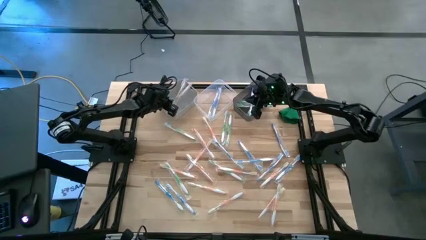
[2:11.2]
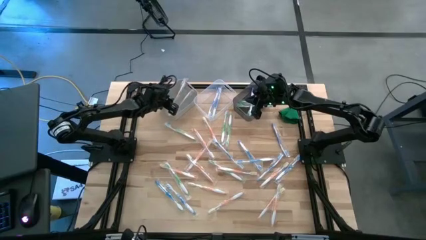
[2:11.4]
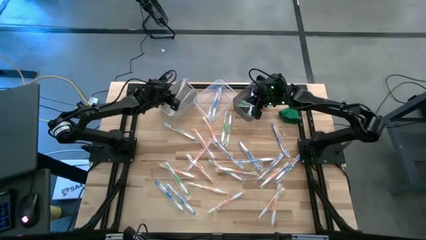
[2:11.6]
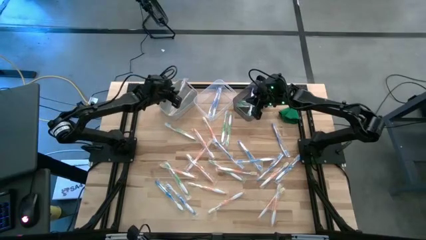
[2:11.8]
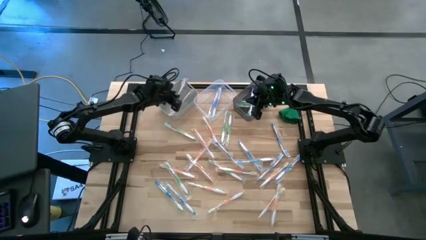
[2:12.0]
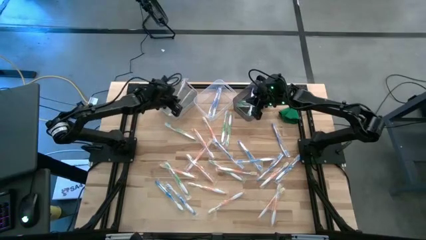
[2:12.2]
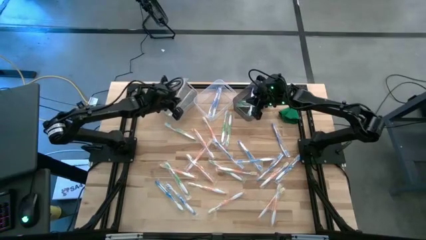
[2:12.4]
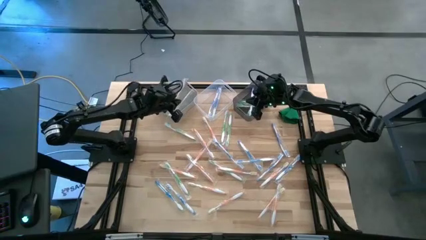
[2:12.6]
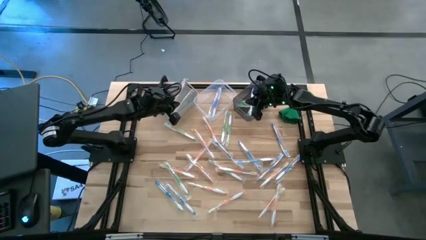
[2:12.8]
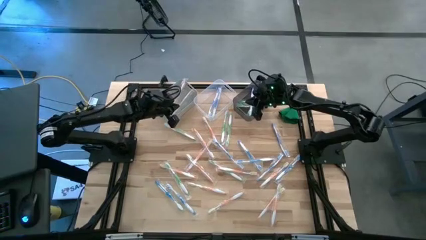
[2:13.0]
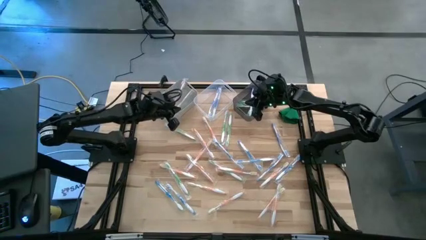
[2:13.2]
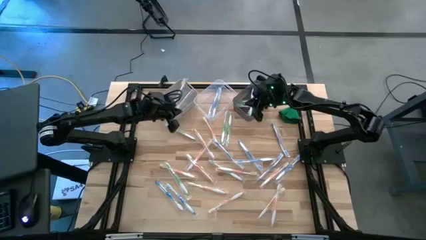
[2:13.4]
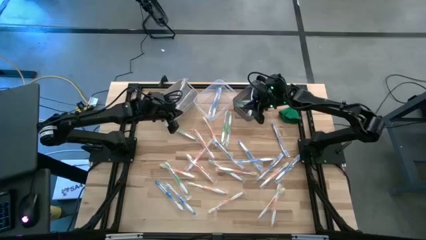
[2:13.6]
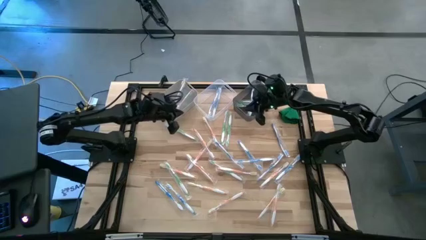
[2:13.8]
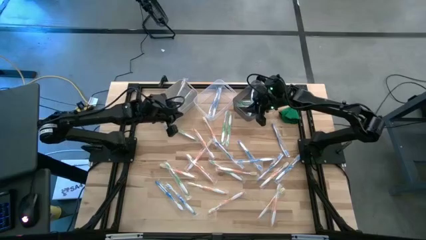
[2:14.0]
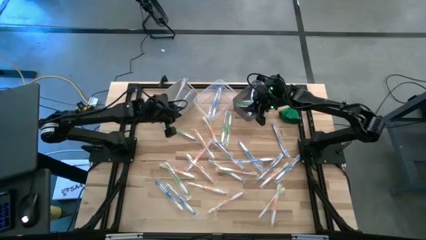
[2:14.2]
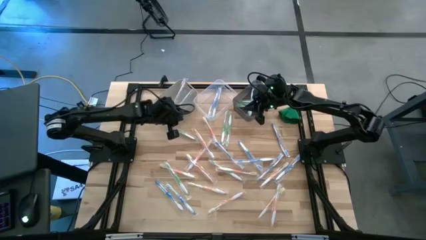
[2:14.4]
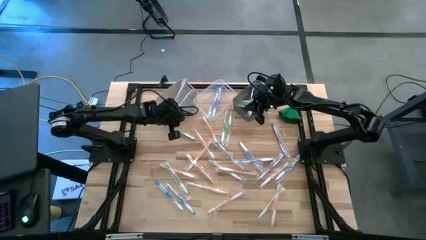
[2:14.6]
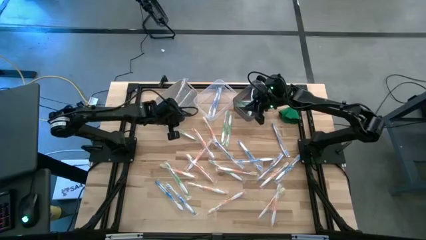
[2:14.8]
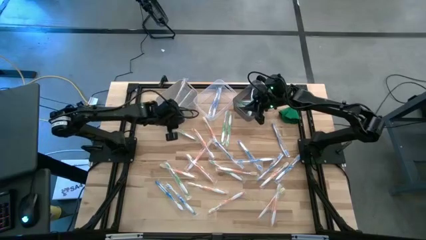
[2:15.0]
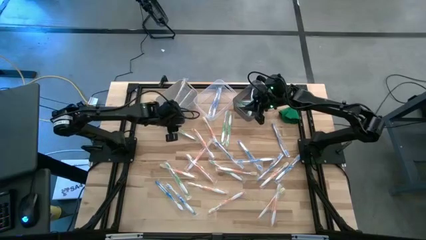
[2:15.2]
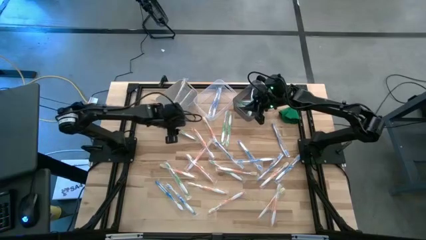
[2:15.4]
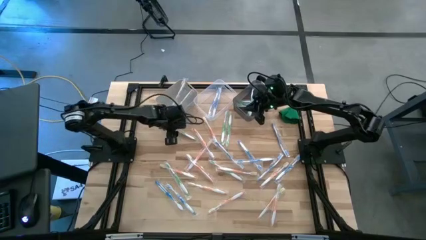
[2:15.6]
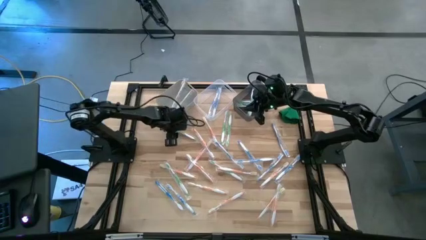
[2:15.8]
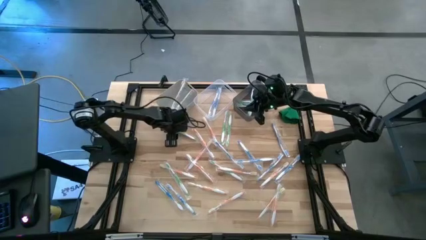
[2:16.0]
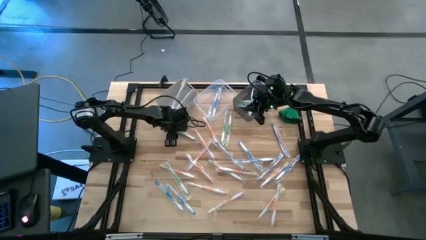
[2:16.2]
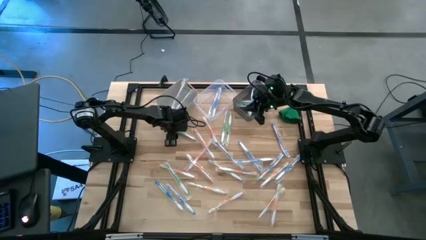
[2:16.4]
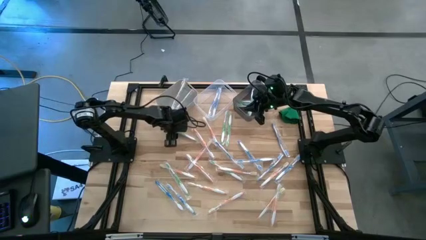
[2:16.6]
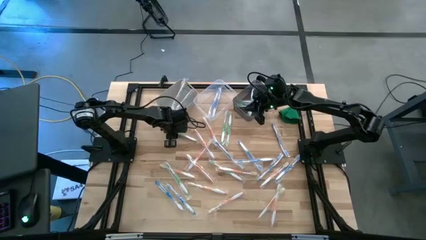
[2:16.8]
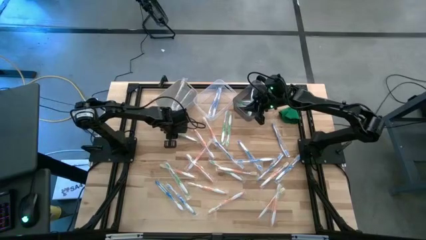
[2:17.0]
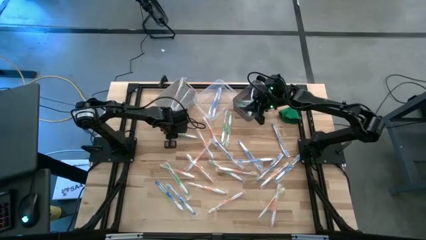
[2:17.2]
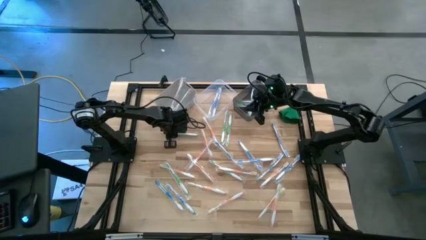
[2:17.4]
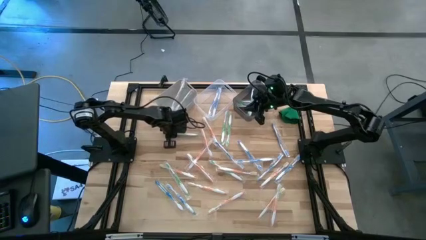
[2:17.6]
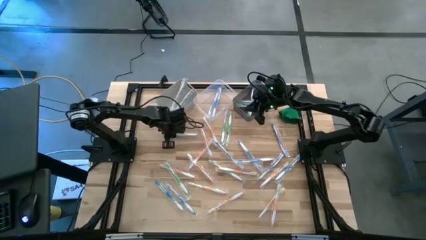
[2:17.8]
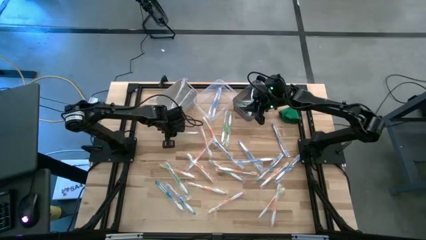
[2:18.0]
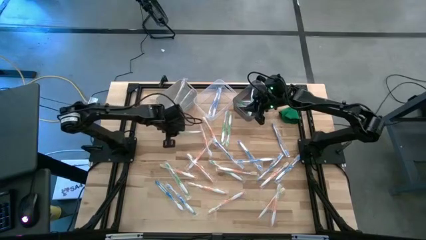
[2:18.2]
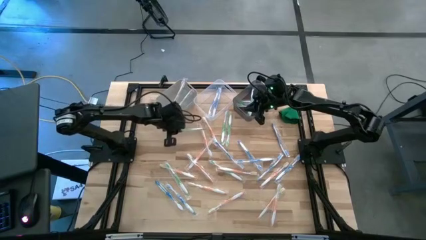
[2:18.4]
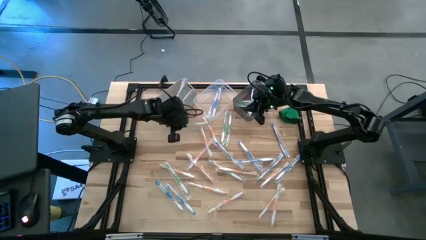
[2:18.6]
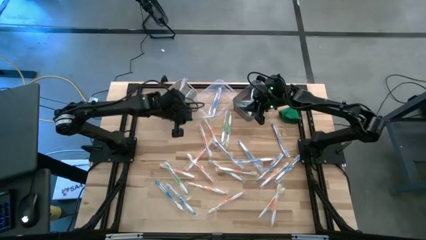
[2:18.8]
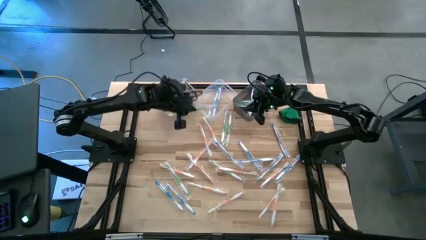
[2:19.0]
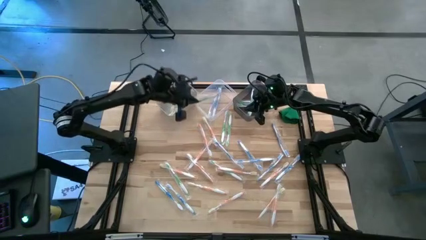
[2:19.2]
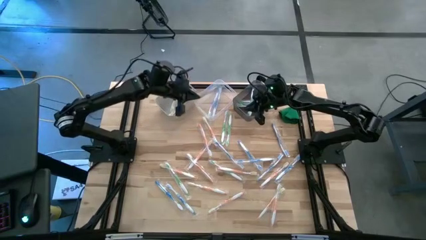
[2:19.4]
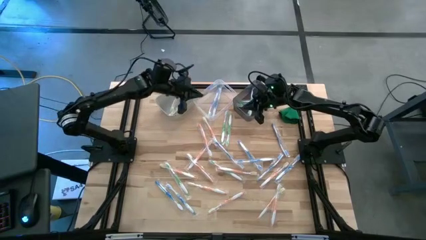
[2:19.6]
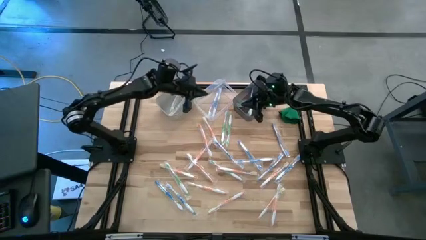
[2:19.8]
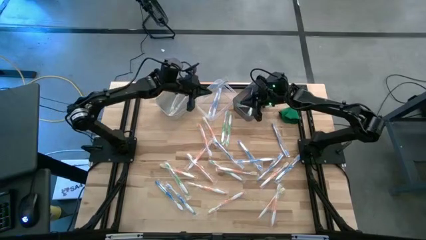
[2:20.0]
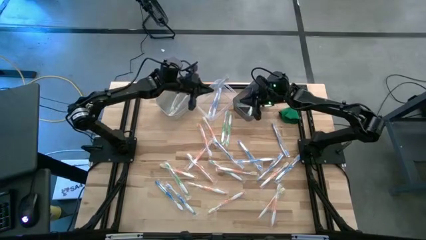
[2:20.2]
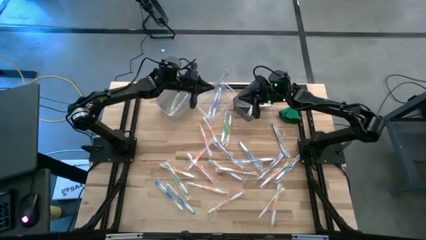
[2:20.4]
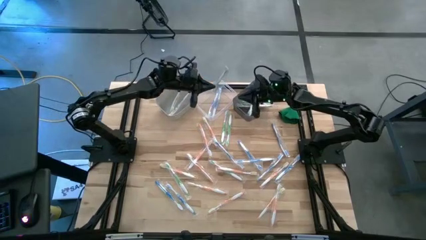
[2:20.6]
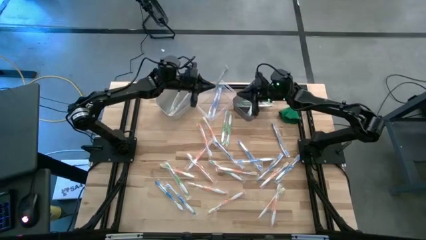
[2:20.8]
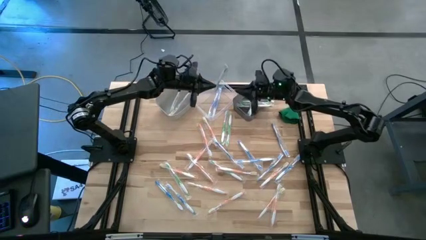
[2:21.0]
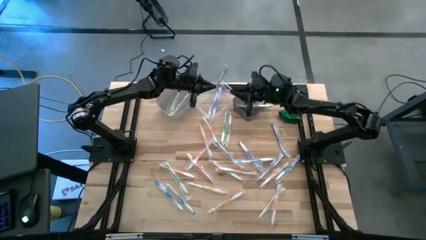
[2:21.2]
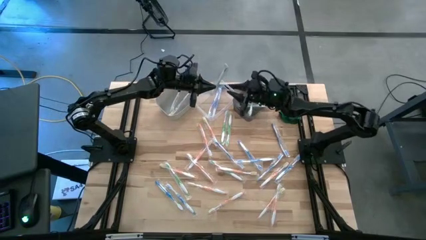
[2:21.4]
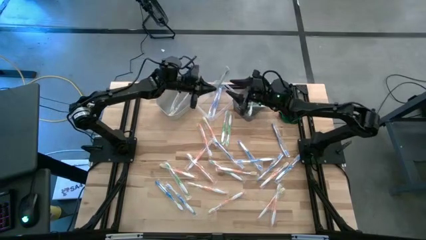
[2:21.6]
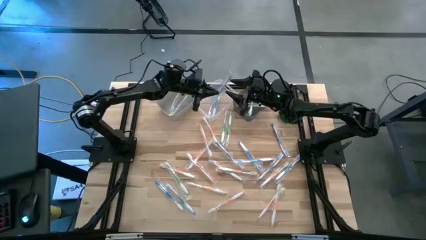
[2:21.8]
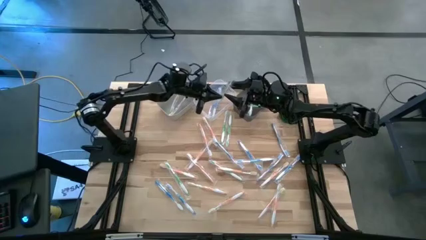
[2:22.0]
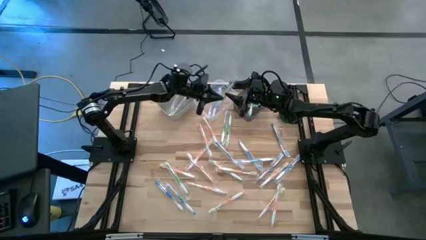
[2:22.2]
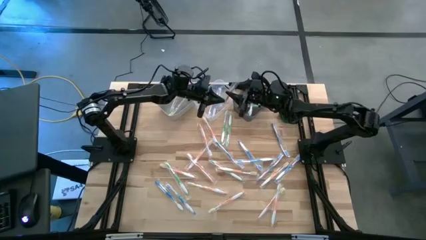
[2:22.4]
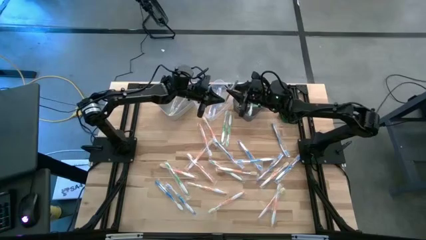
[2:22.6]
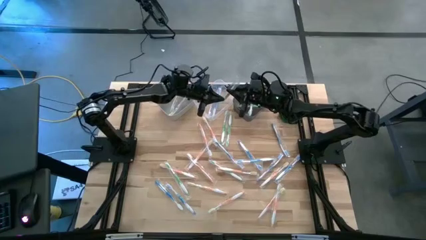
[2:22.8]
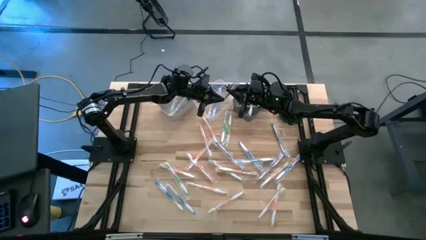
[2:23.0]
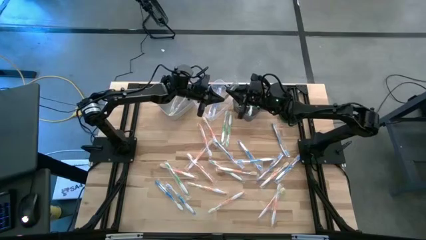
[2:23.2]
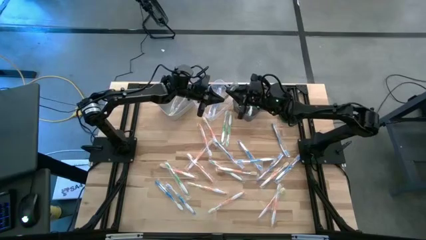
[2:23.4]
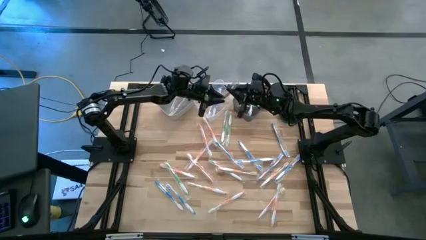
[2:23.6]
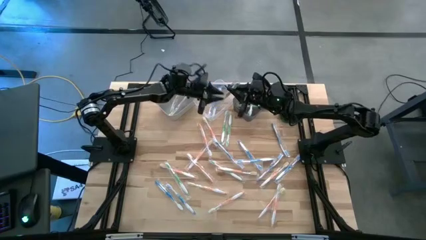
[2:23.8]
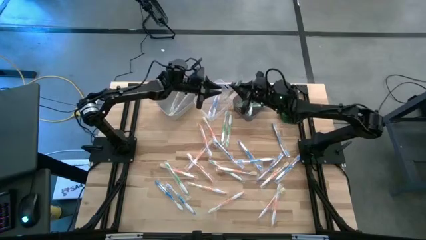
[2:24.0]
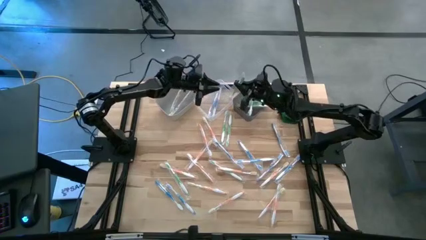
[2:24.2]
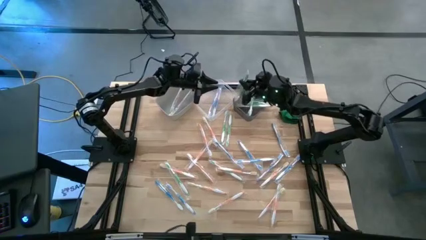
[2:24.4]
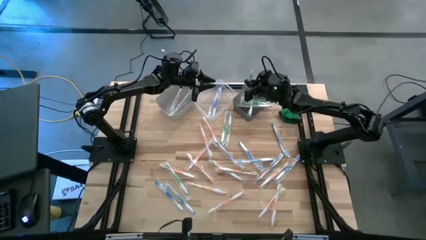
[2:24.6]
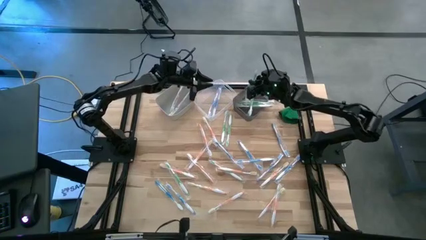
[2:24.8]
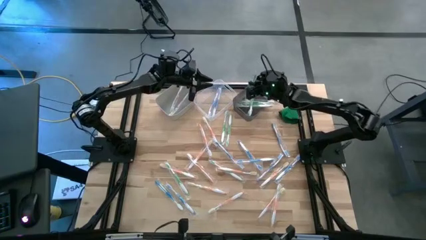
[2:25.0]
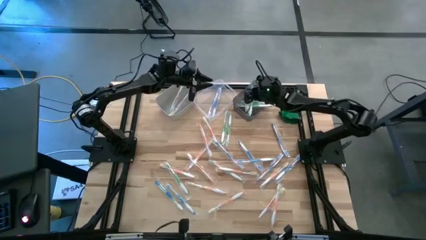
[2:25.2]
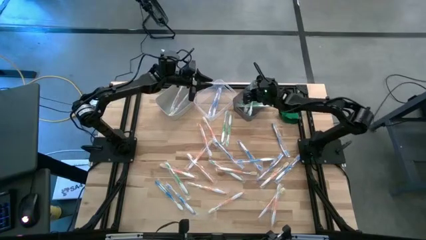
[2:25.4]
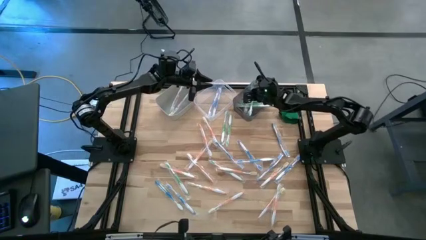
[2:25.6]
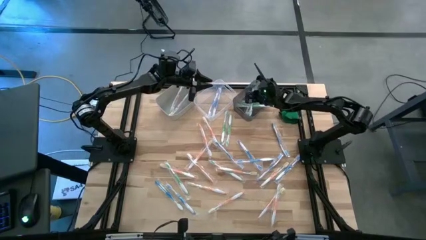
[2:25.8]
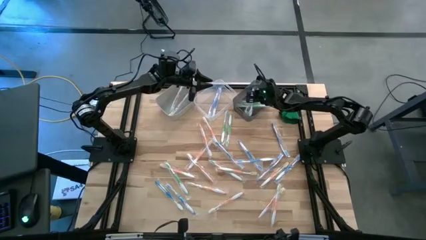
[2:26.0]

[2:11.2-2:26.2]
Task: Pick & Place Toothbrushes
Put the green toothbrush into the black bin

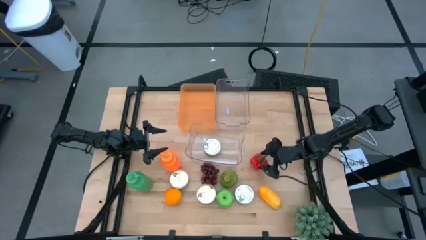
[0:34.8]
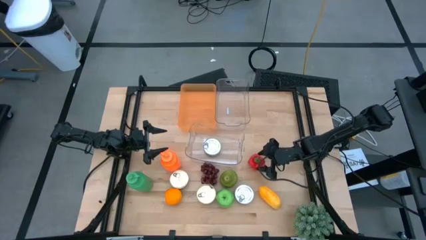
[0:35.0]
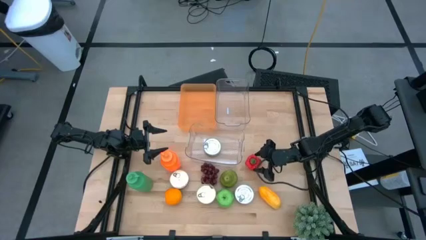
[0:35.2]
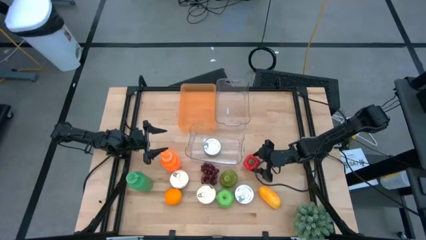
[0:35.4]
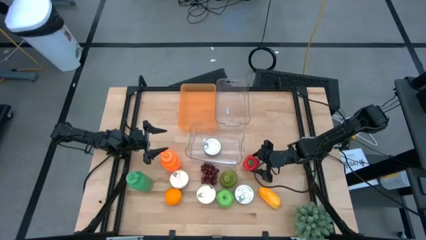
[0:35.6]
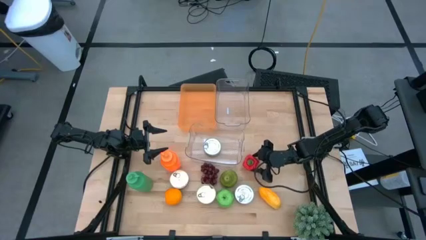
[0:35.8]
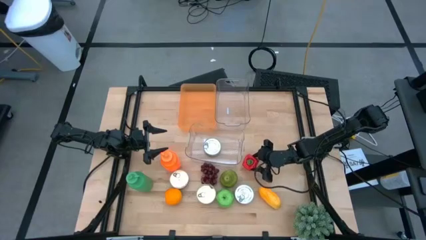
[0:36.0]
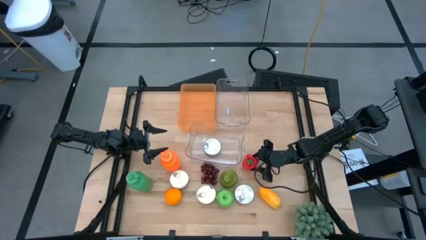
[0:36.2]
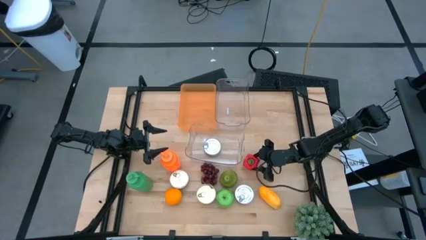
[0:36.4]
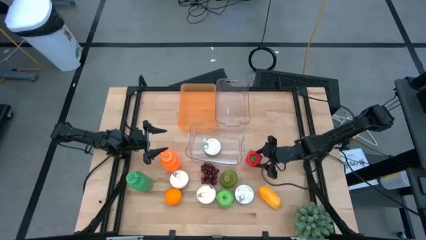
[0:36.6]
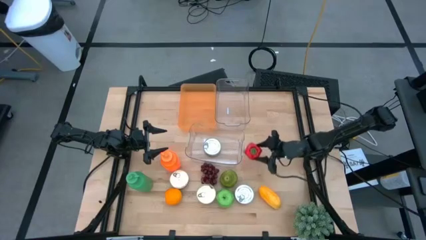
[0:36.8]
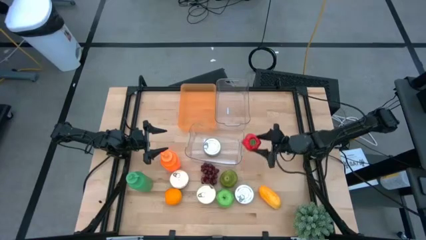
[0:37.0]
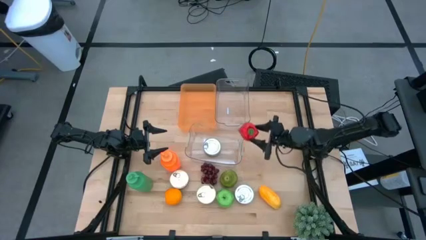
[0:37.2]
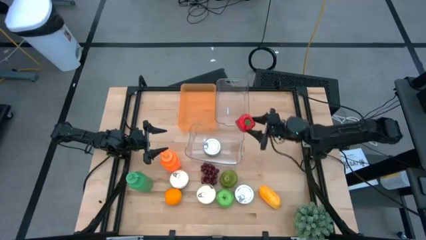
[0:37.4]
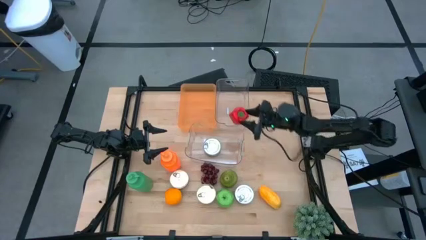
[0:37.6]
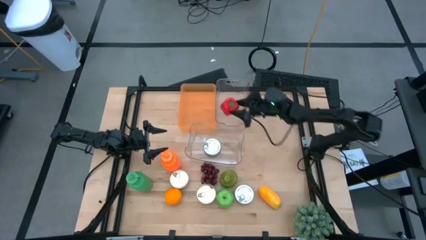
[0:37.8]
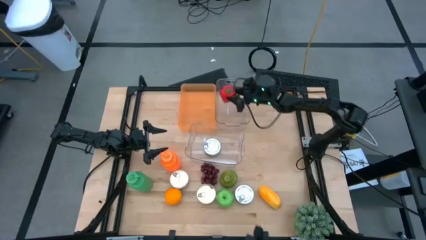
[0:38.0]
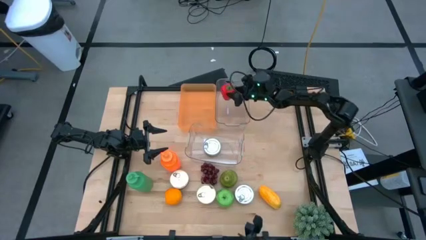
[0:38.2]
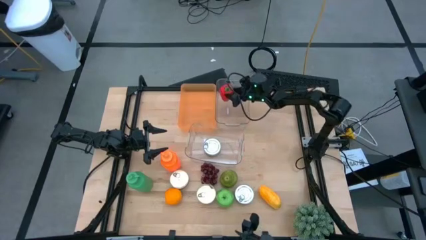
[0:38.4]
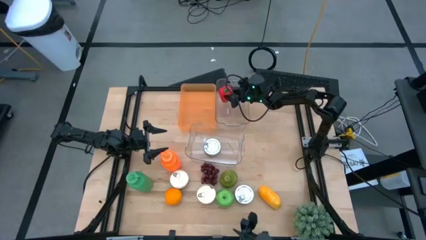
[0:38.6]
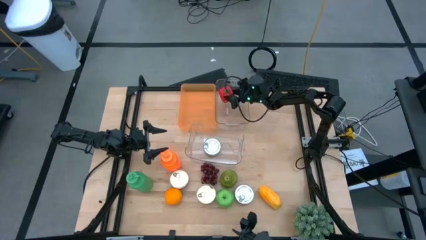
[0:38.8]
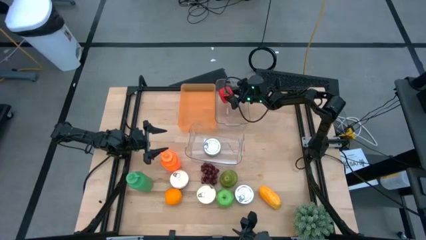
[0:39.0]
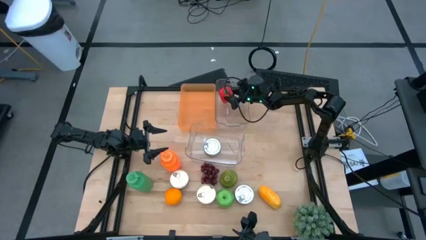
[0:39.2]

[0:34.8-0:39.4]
Task: Pick & Place Food Item
Put the bell pepper into the top transparent bin
